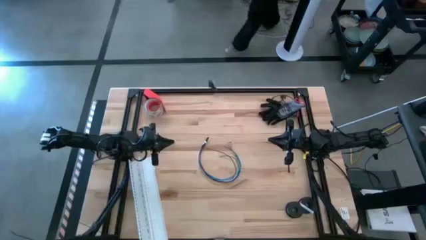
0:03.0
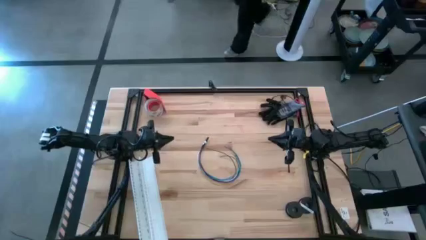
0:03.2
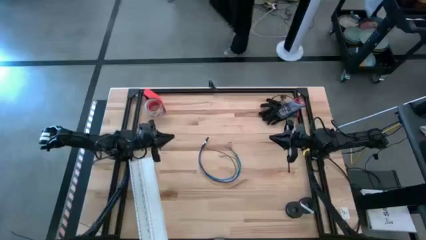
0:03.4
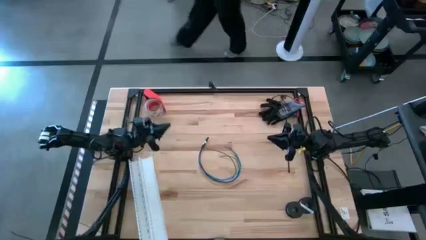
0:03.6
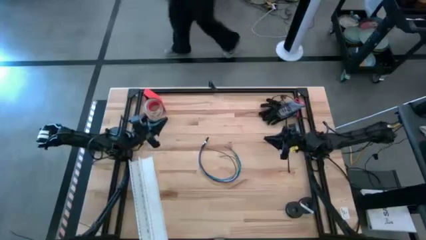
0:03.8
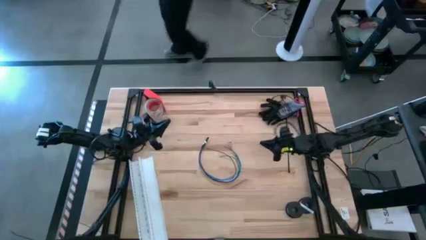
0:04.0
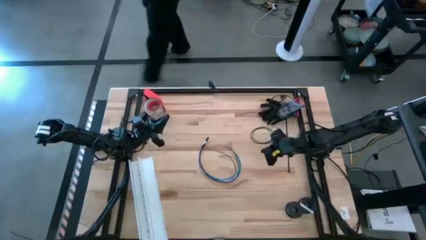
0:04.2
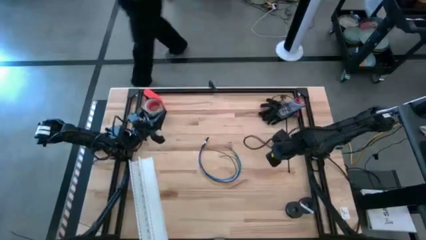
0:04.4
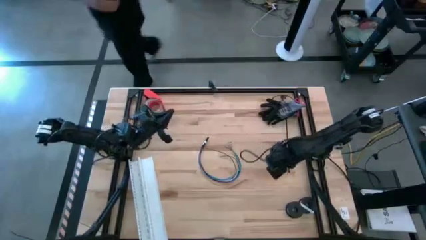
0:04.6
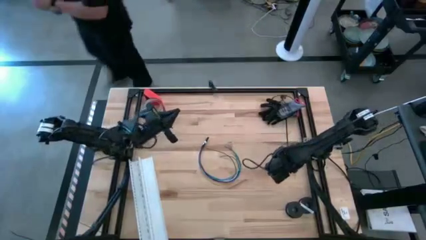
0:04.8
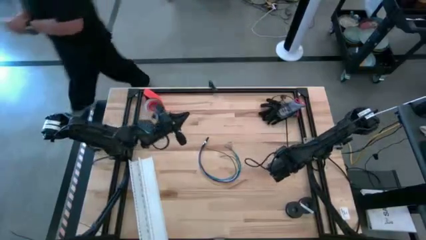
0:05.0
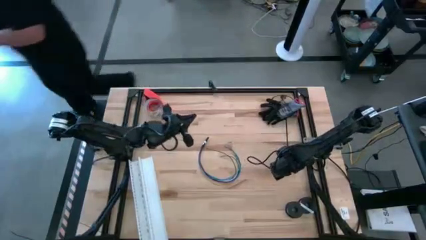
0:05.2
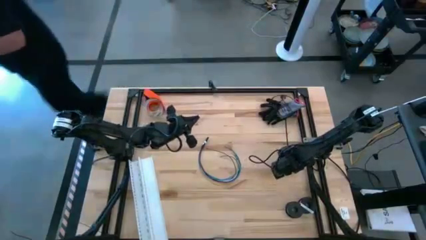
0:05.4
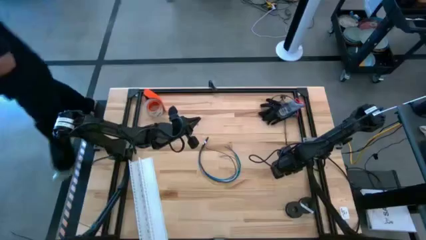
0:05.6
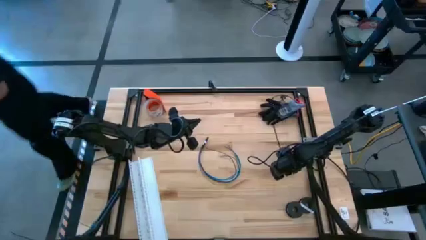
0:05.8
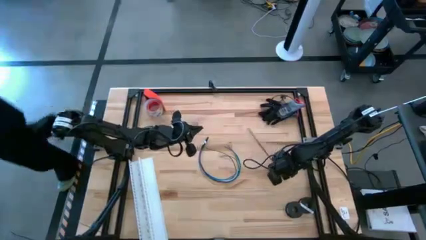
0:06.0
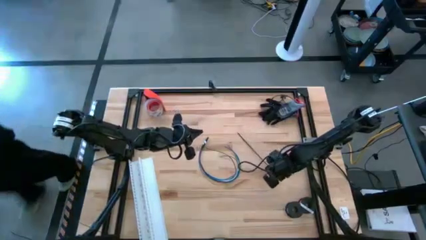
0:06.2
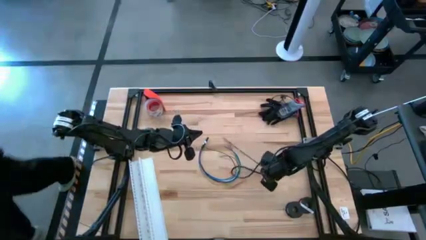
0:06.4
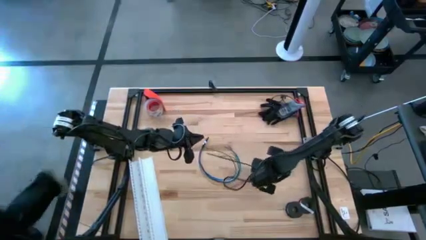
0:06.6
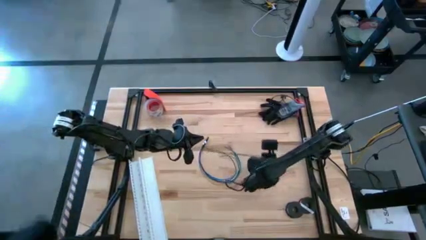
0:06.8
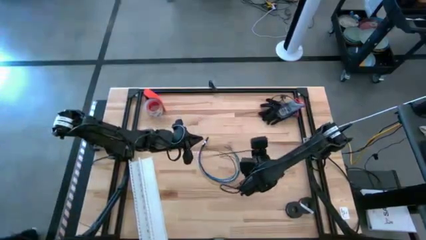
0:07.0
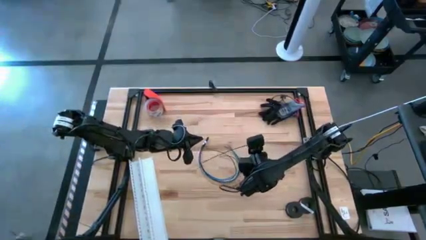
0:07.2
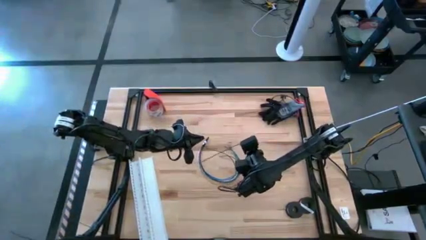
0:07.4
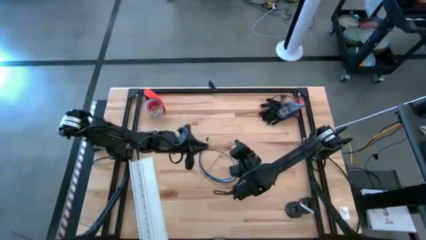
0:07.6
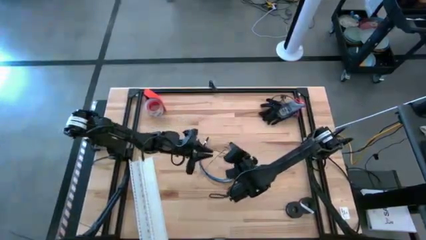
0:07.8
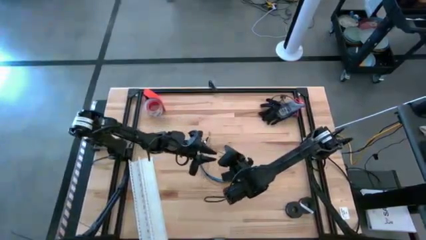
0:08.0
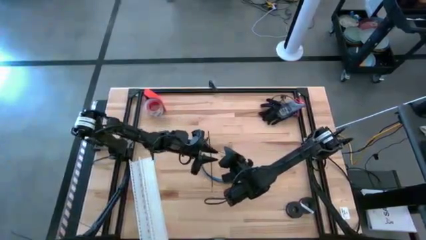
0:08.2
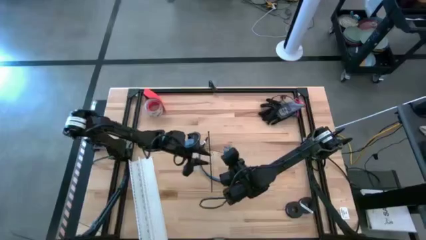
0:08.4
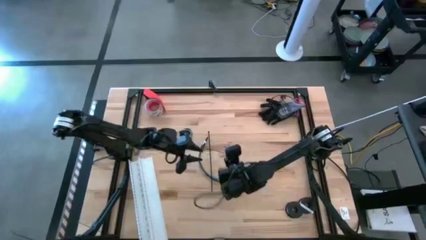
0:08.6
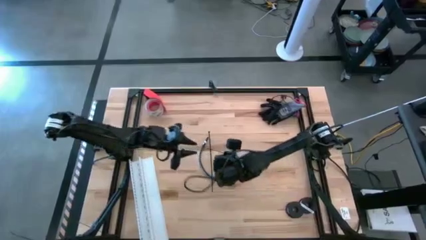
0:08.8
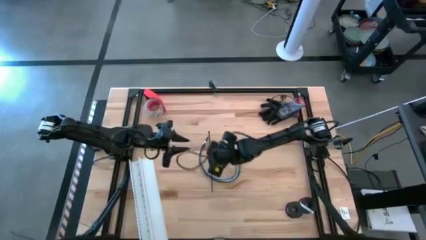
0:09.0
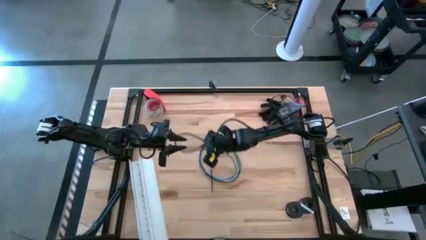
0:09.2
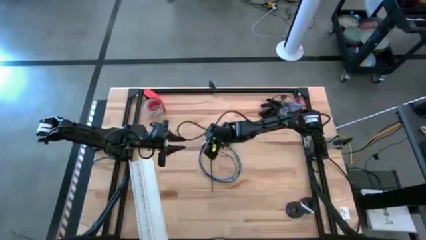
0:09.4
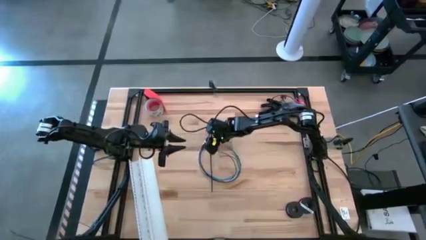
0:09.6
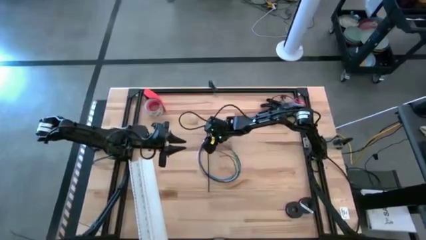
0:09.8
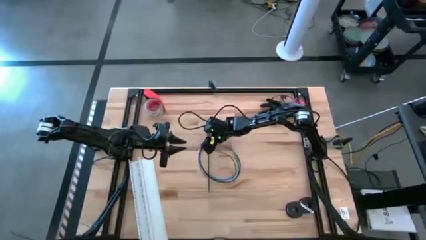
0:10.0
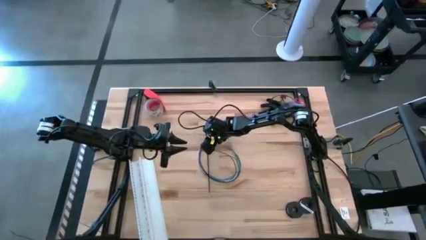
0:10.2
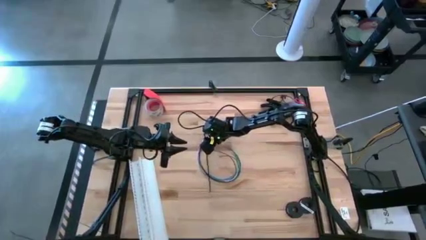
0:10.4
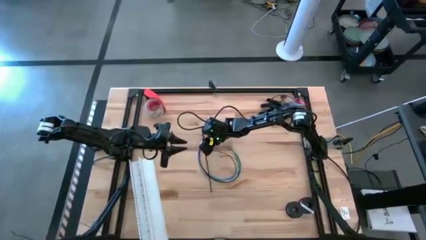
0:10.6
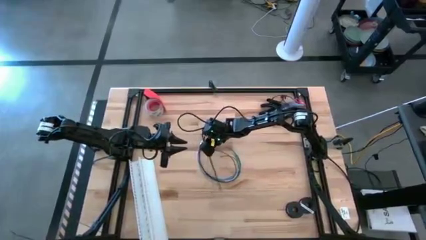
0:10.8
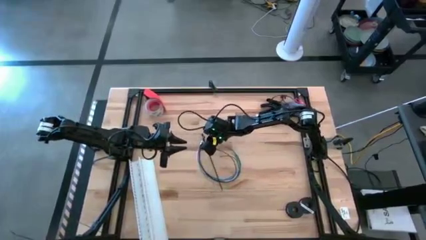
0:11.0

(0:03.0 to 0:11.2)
Task: Ziptie cables
Put a zip tie on the cables

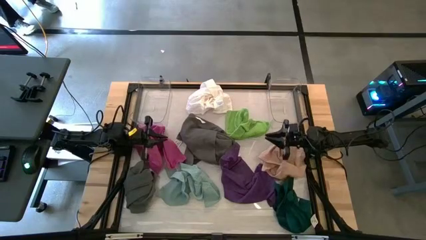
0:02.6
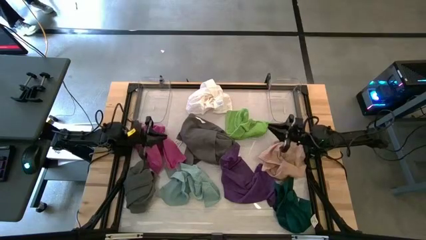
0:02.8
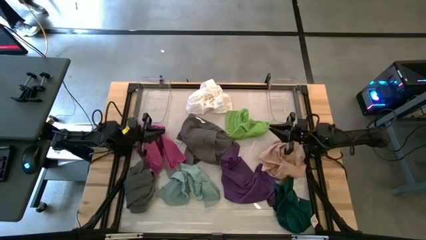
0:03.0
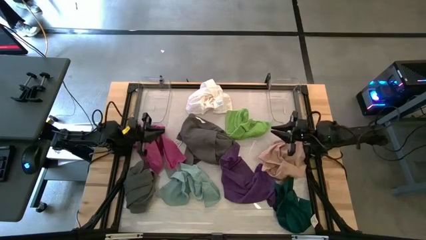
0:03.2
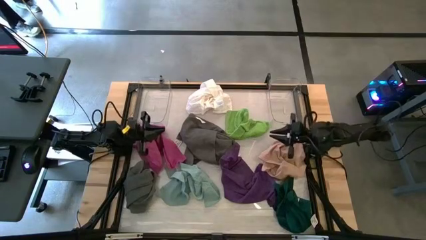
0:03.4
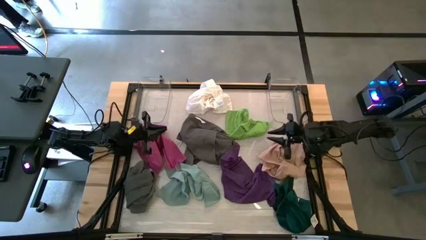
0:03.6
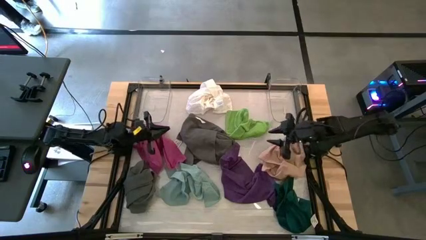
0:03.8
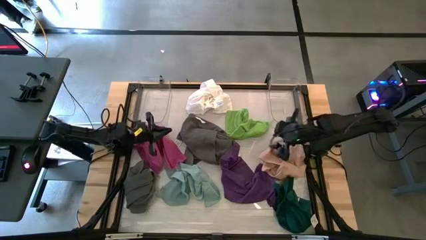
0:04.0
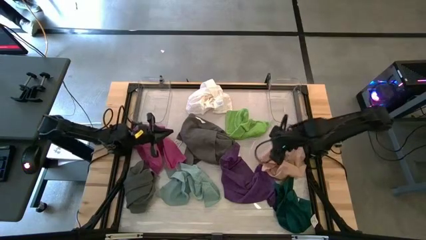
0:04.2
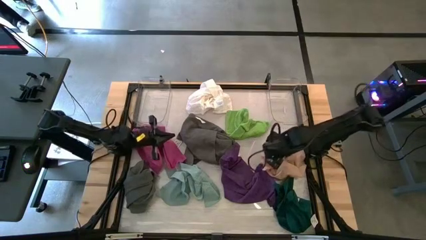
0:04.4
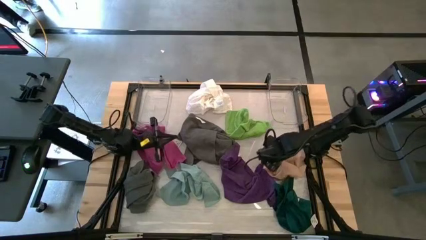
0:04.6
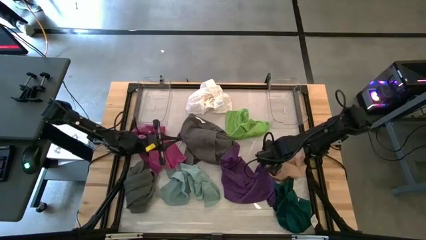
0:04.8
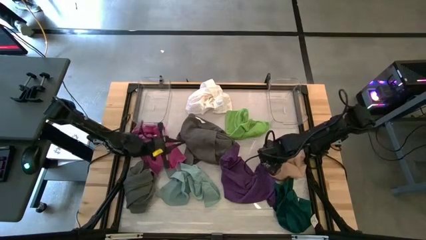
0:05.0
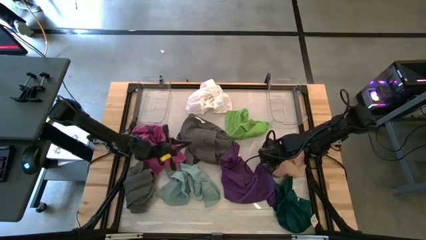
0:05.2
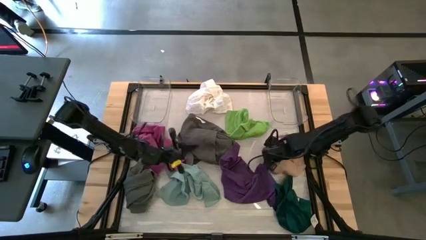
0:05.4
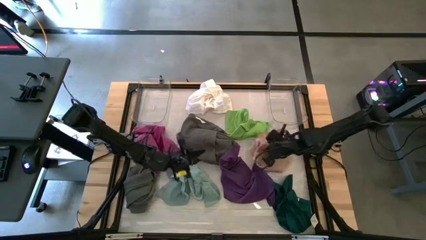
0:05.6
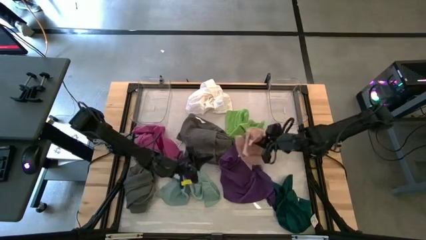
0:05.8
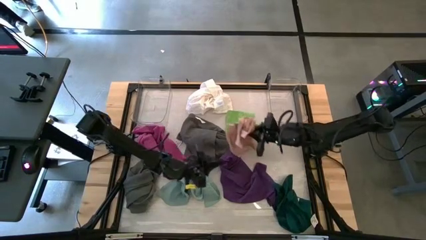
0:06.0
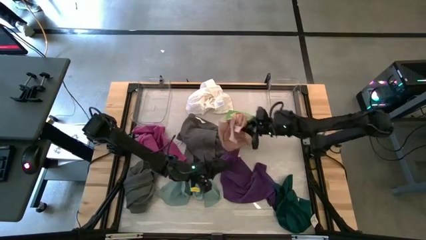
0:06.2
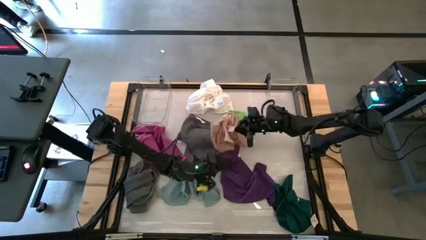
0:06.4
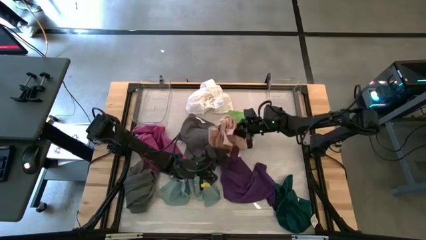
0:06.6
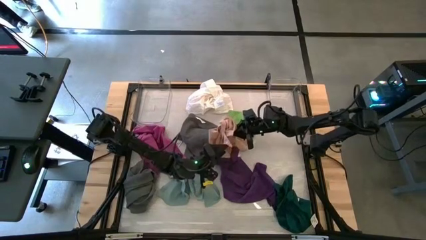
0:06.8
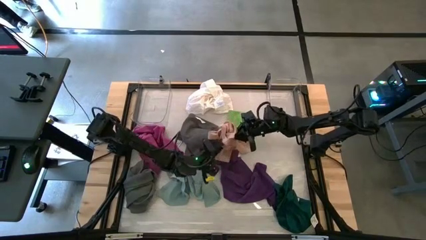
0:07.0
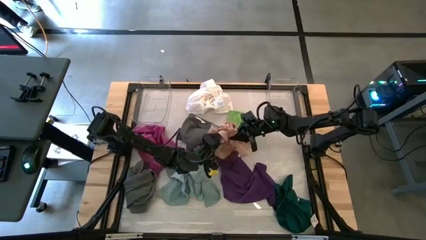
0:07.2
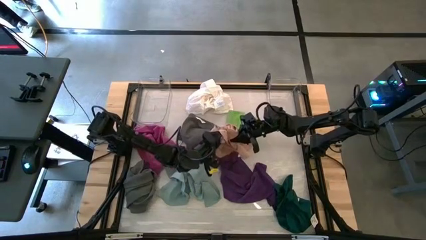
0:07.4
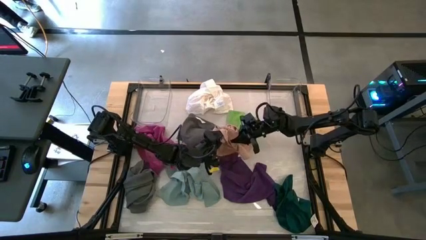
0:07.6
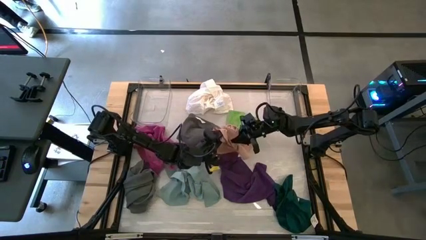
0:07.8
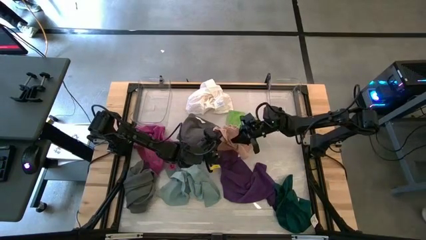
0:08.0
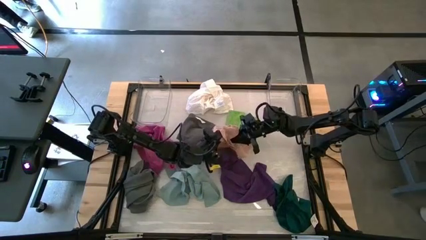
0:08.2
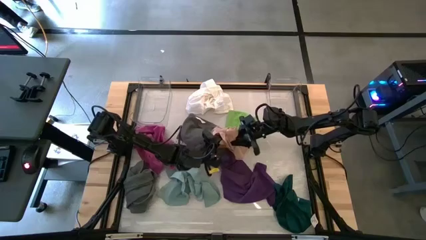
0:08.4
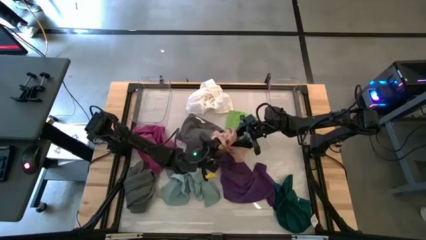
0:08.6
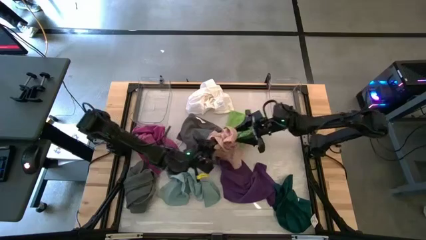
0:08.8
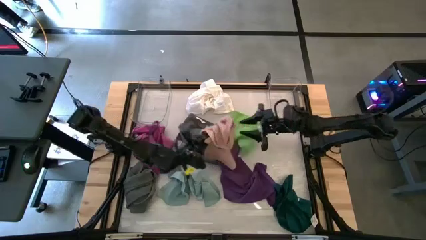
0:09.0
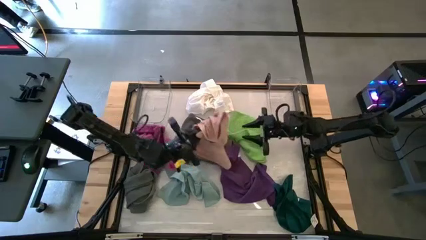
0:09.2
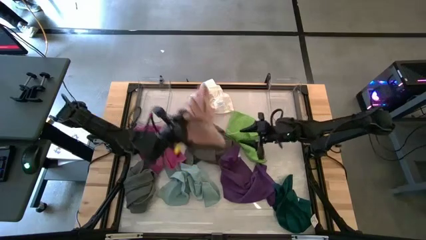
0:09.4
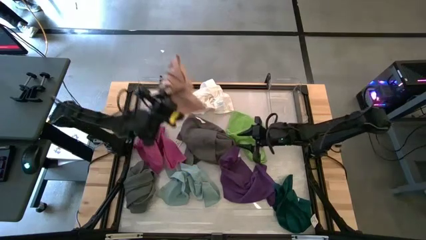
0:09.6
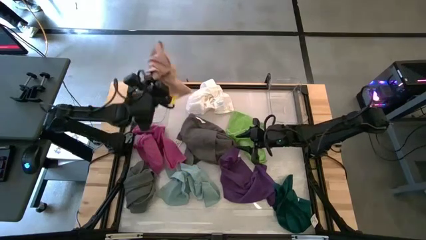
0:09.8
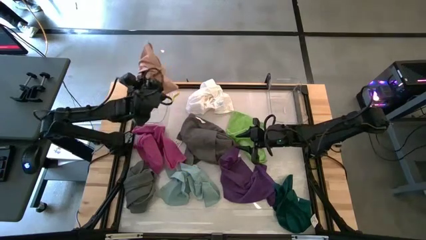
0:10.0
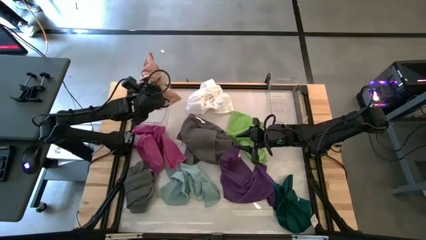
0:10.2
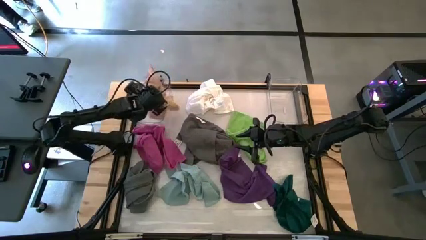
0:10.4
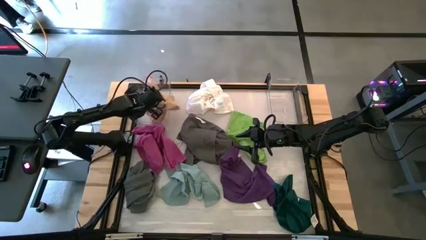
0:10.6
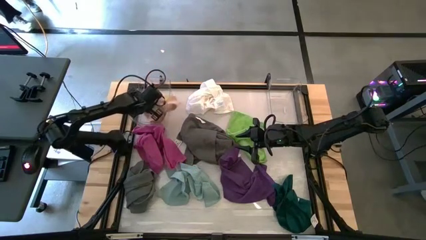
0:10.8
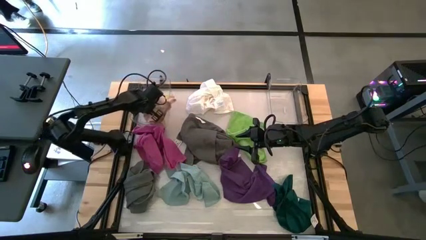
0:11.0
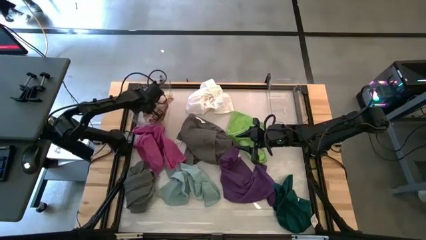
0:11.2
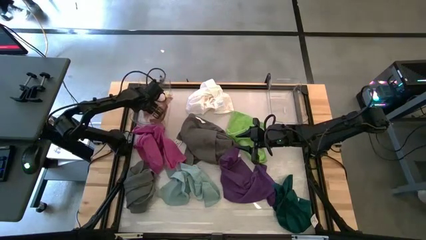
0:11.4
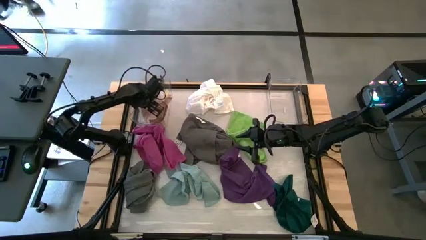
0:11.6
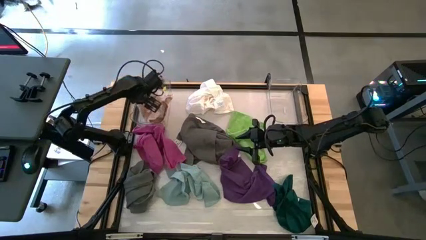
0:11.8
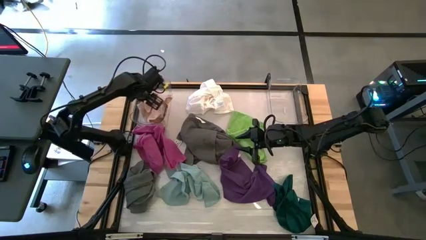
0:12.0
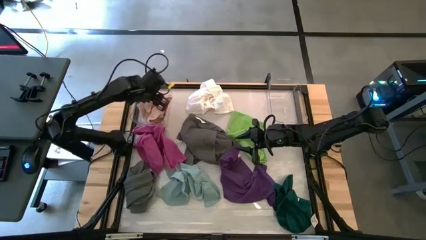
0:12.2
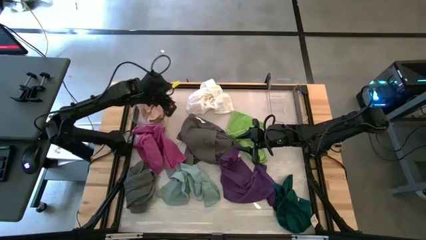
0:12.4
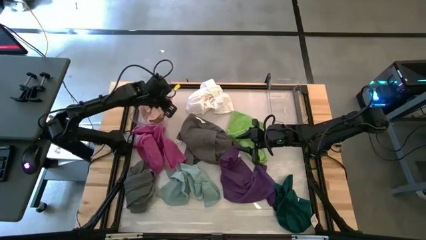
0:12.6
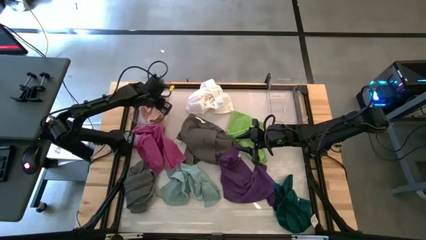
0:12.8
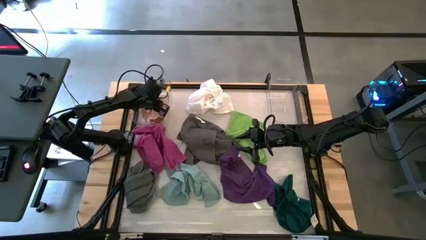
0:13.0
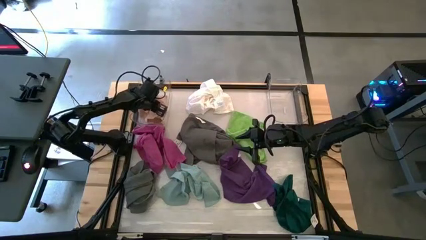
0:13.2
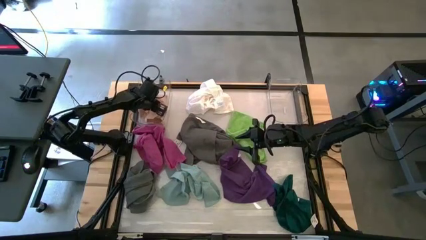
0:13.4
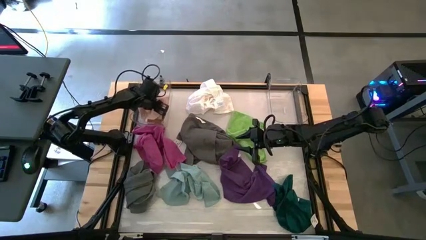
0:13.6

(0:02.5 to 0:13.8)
Task: Sort towels by color in basket
Put the brown towel into the left transparent bin
